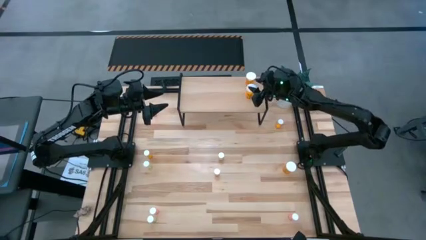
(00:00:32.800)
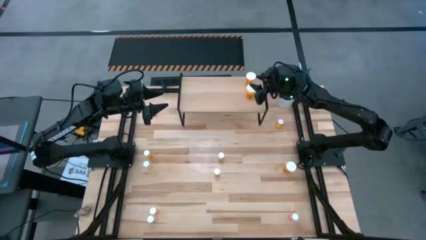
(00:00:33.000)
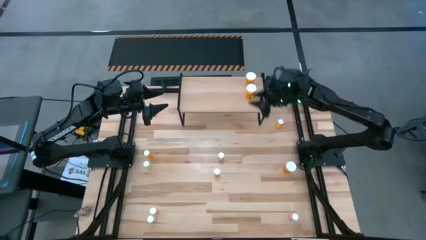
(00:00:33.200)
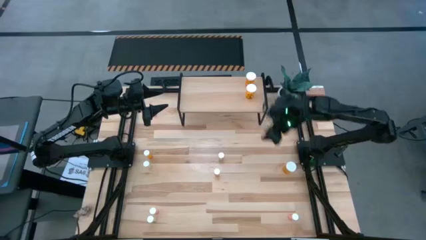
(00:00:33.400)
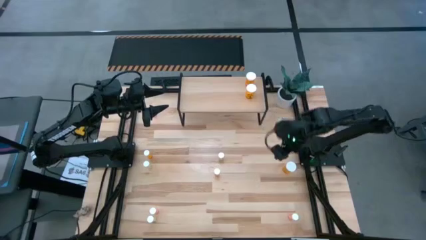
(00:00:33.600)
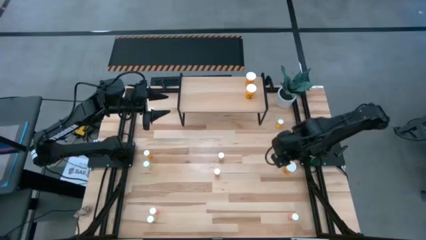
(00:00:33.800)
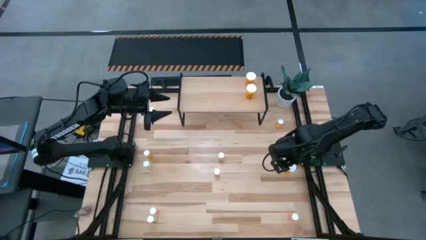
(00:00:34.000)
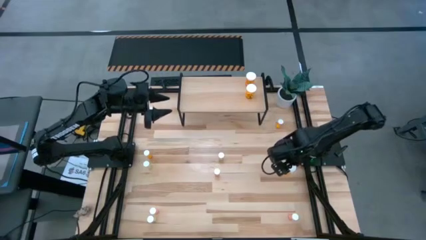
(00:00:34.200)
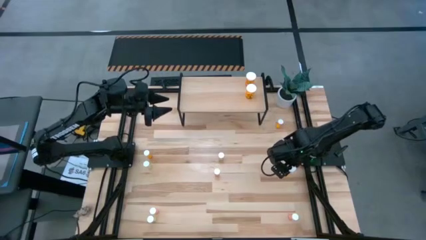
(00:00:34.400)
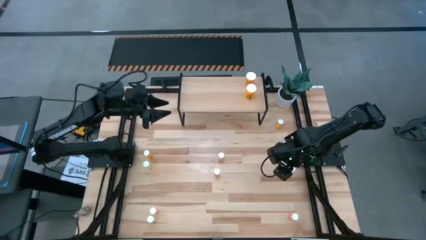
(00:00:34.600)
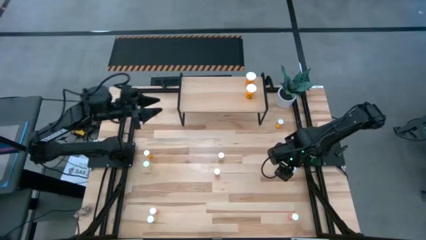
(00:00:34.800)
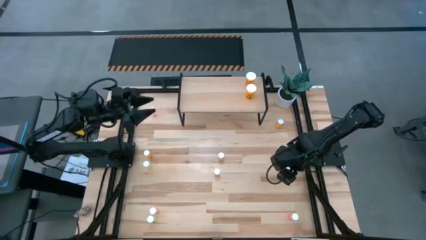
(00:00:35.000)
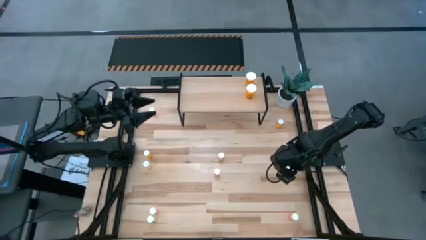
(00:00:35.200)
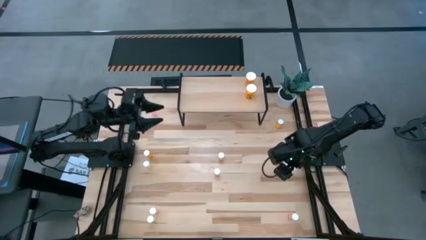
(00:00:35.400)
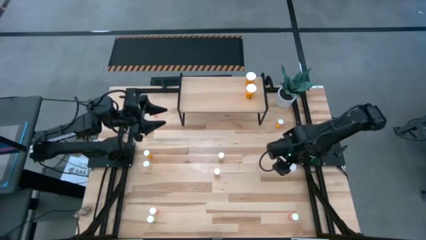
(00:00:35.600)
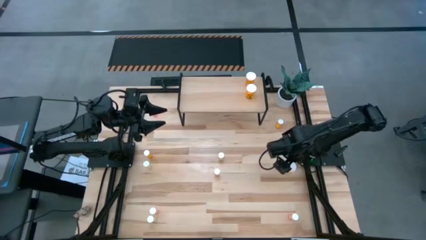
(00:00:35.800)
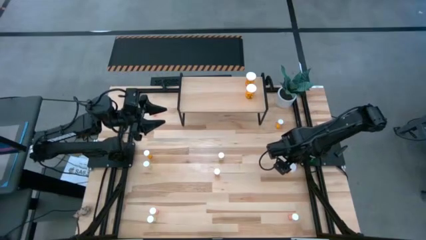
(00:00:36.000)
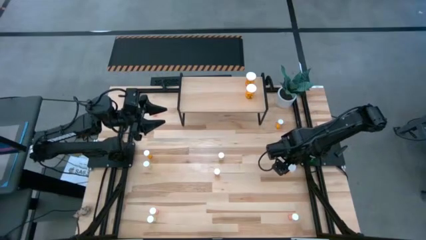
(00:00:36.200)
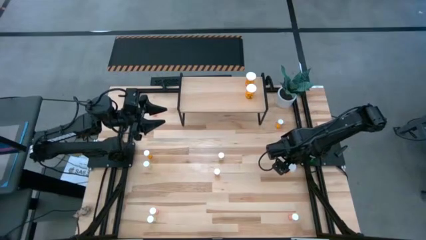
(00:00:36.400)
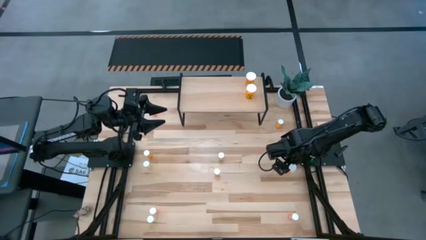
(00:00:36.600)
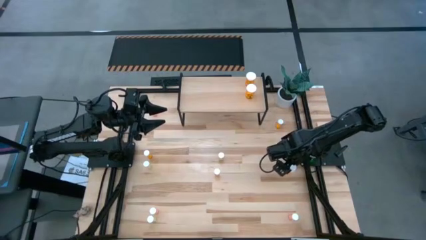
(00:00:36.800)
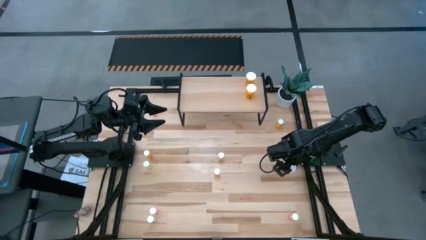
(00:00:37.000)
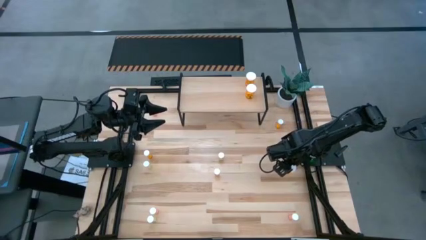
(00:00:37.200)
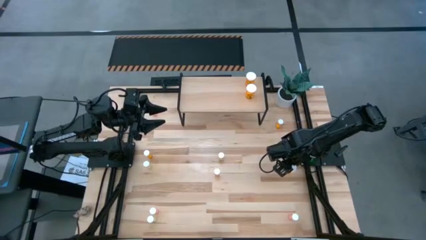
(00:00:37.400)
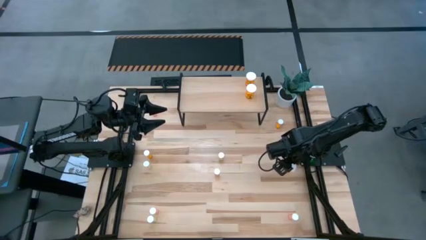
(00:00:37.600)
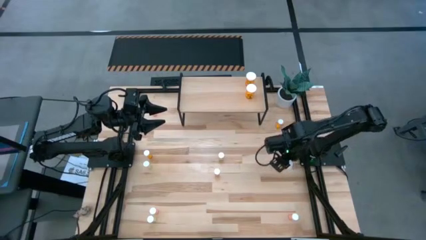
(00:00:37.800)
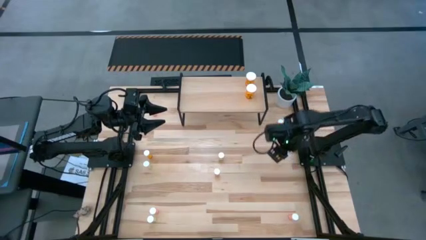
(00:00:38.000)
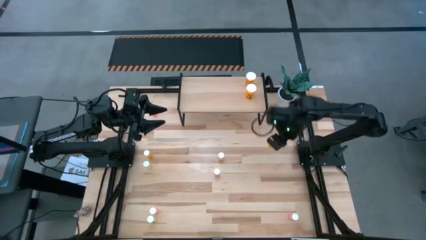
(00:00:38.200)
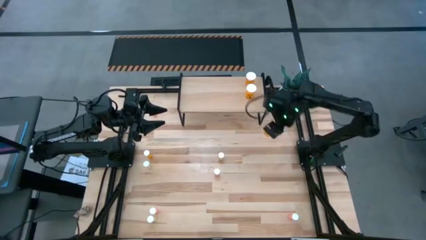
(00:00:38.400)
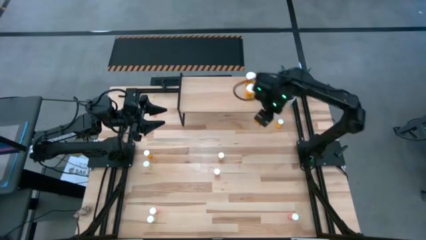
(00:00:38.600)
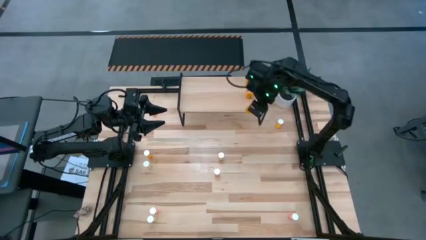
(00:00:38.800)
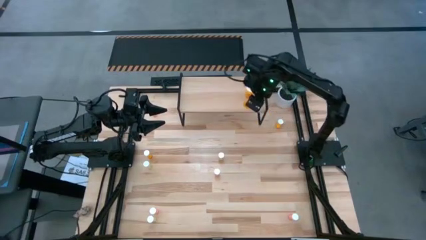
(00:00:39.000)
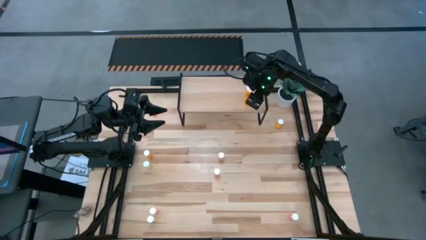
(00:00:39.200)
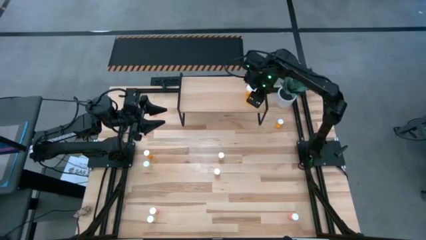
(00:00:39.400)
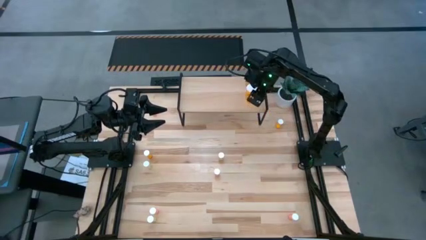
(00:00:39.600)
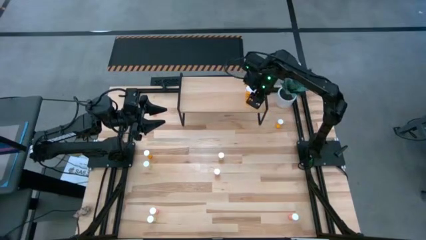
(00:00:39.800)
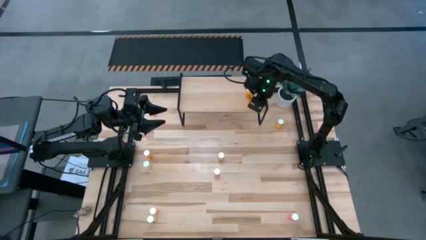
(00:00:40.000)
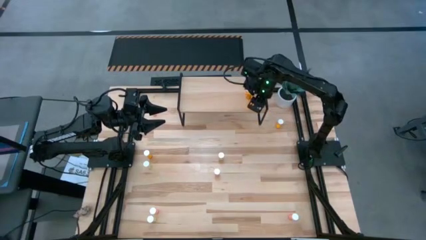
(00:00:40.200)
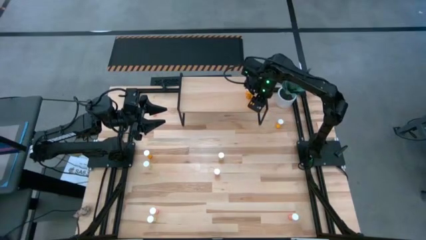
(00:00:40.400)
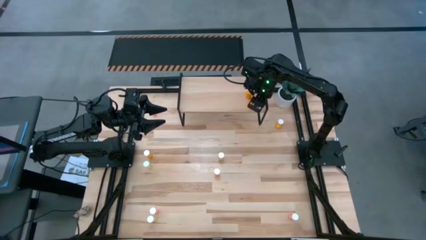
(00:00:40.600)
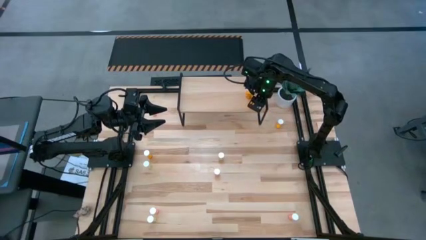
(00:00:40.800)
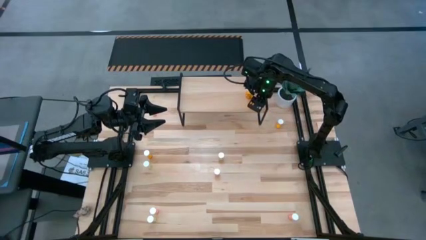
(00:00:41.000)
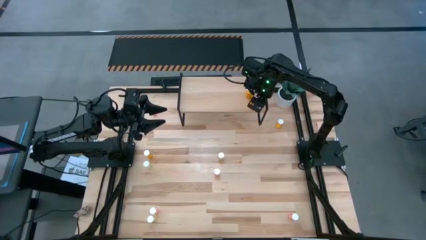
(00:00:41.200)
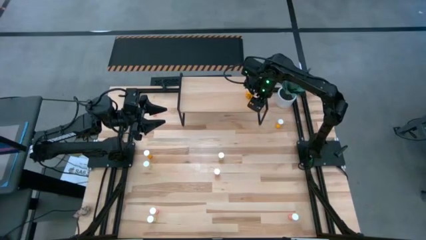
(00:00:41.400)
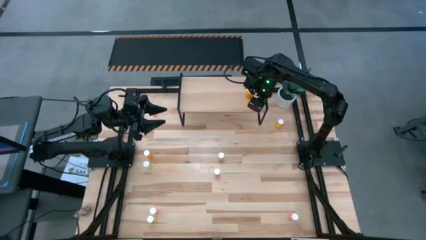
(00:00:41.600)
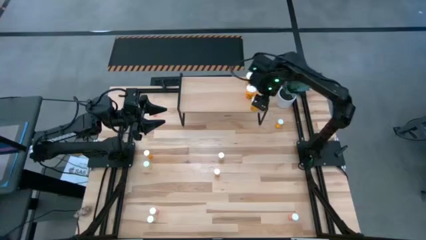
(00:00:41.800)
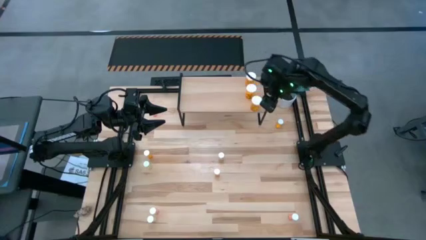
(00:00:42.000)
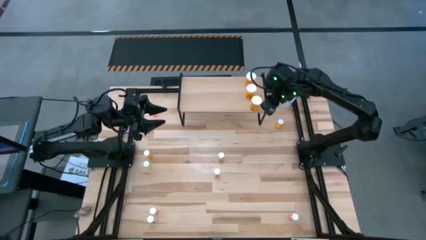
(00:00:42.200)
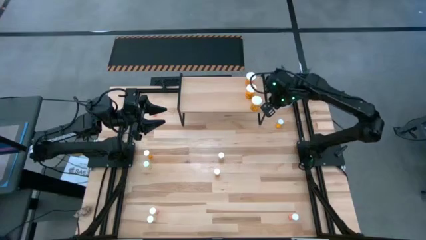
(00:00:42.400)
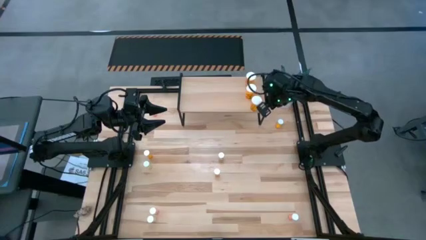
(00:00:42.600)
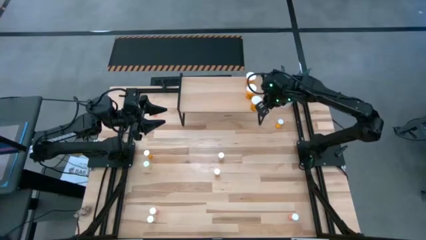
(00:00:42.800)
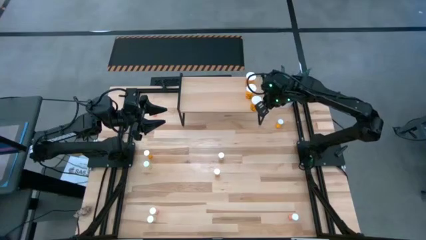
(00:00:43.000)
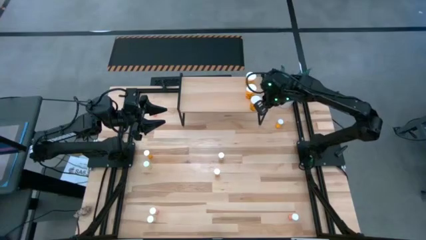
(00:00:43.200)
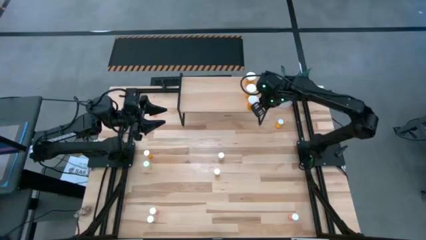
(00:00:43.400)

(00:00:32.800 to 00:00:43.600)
Task: Pick and place medicine bottles onto shelf by color
Put the large orange pill bottle on the shelf aligned with the other large orange pill bottles
